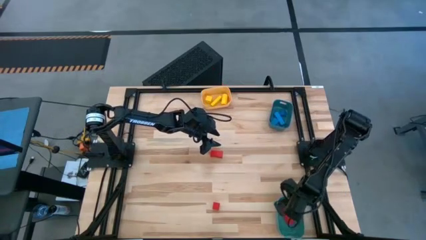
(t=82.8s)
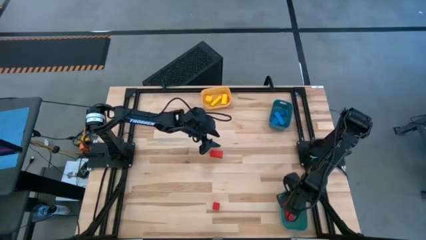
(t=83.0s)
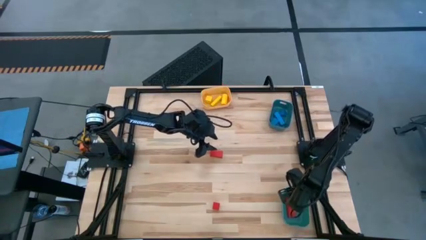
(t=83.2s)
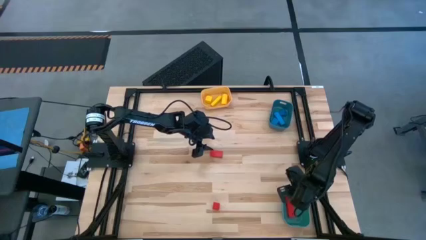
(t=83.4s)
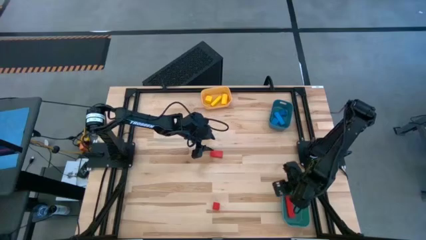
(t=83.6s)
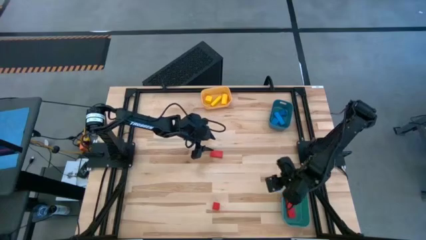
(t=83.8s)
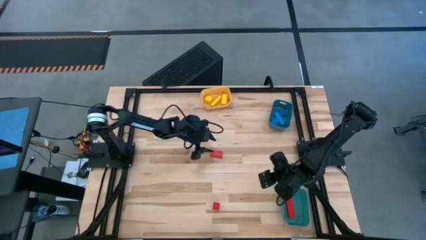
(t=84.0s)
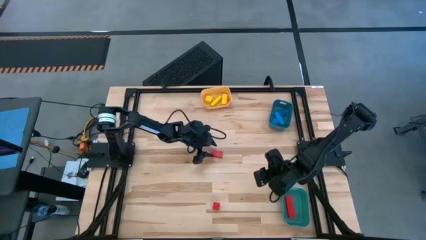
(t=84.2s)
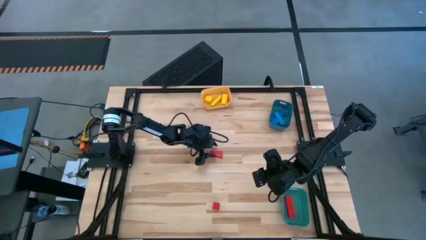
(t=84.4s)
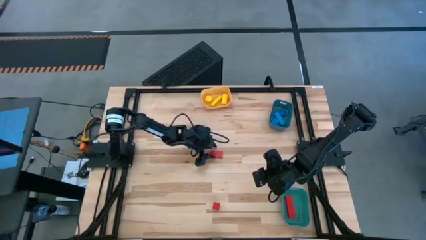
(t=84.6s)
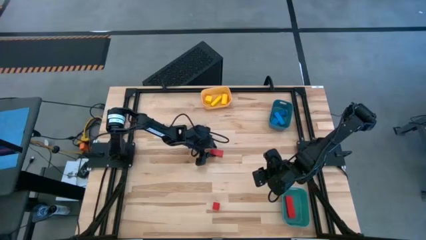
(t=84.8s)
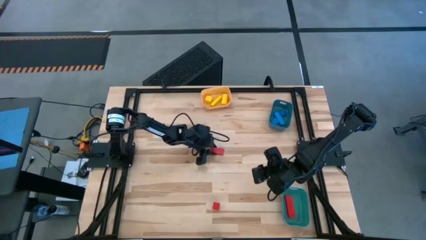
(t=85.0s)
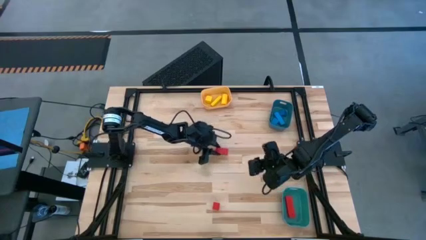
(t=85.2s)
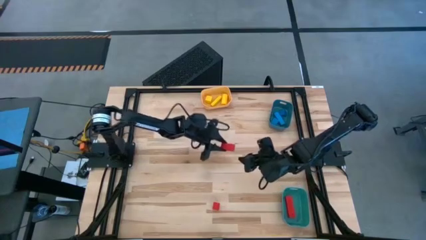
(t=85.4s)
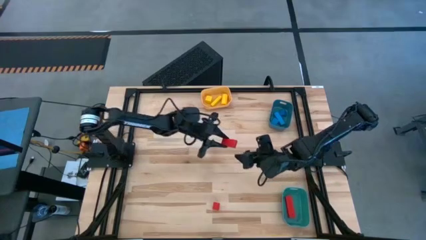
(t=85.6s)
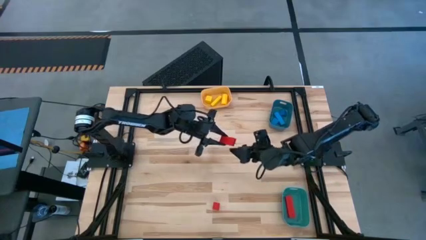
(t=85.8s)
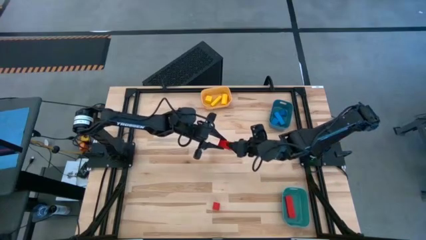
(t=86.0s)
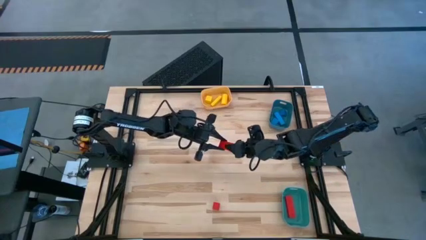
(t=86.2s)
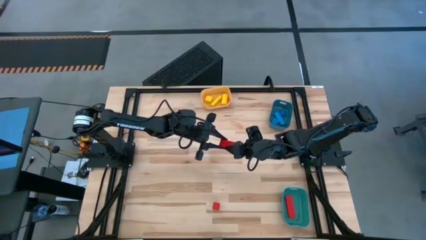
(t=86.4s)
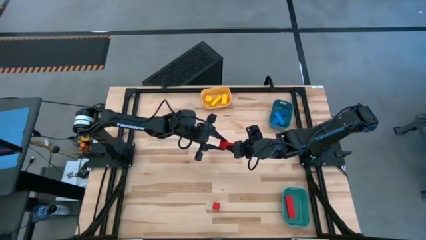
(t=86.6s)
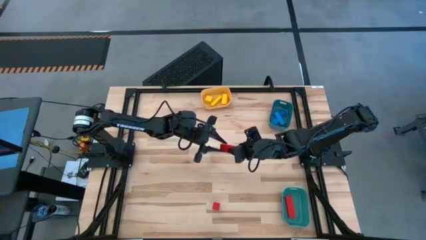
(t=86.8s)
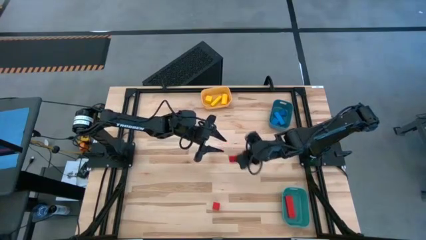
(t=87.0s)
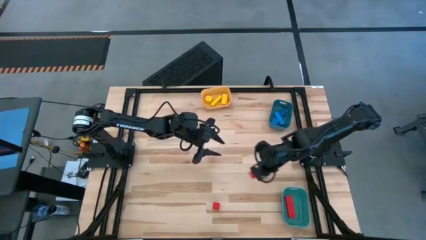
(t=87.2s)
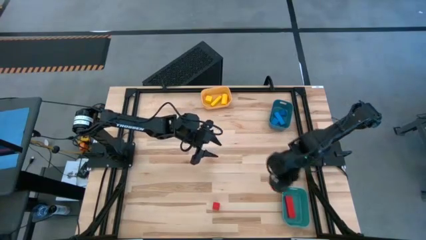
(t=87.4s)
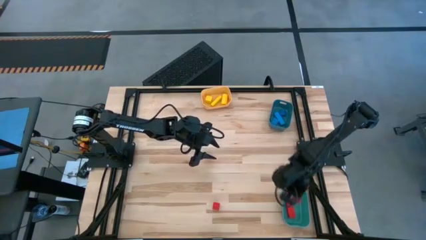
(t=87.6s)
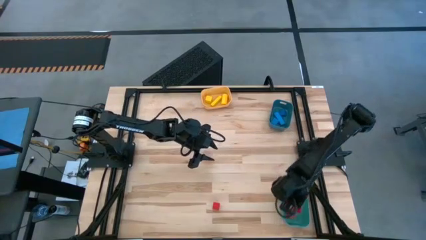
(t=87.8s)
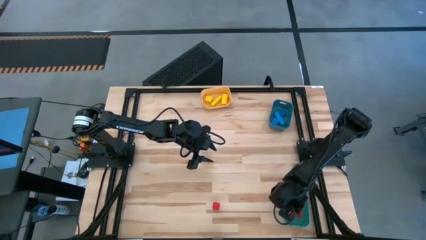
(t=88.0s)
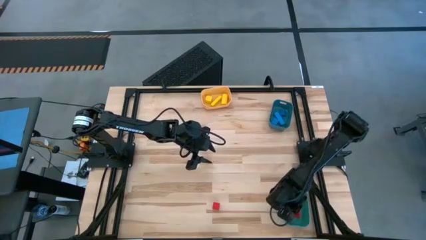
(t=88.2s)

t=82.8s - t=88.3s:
Task: Sort & place blocks by color
Put the top red block into the green bin

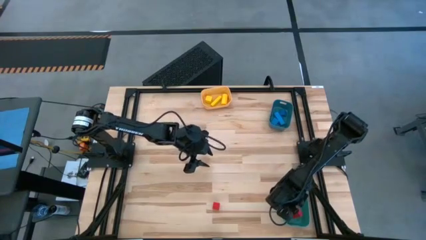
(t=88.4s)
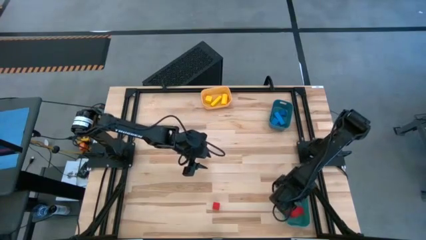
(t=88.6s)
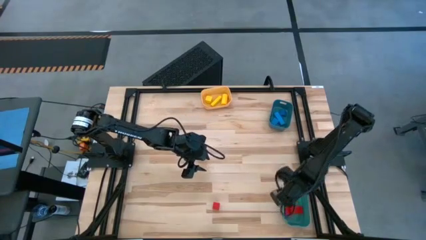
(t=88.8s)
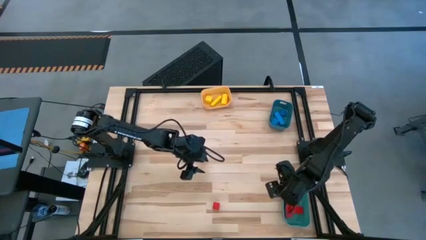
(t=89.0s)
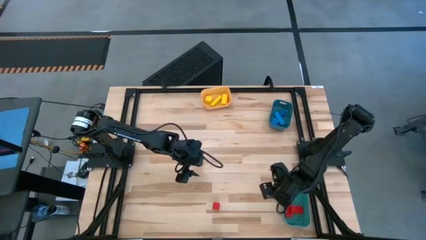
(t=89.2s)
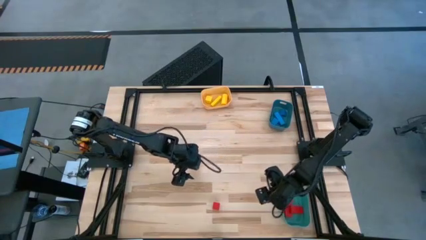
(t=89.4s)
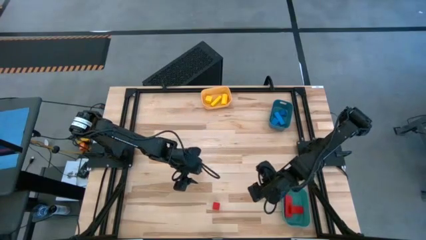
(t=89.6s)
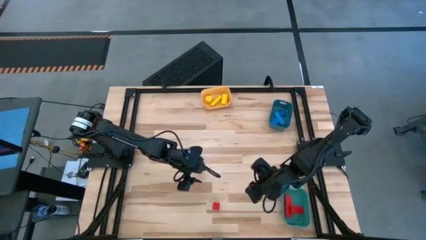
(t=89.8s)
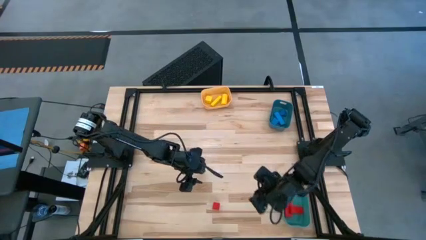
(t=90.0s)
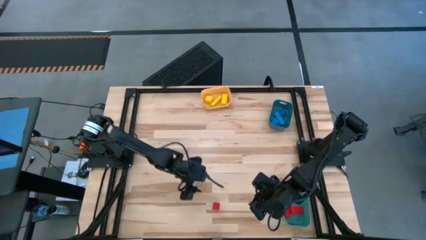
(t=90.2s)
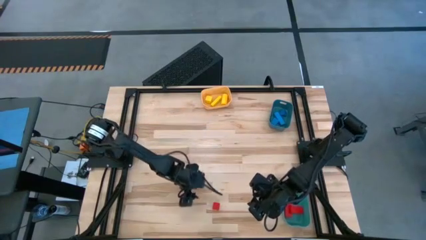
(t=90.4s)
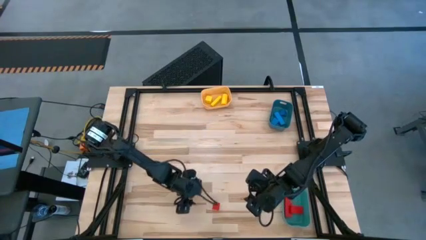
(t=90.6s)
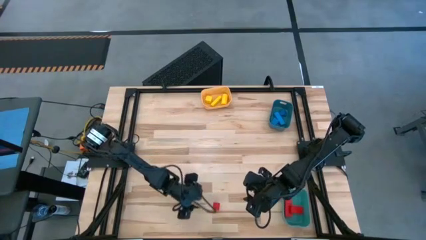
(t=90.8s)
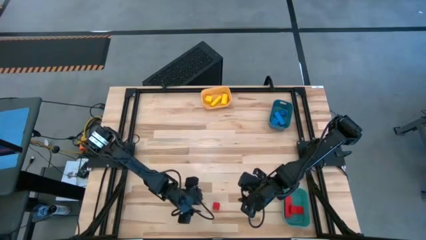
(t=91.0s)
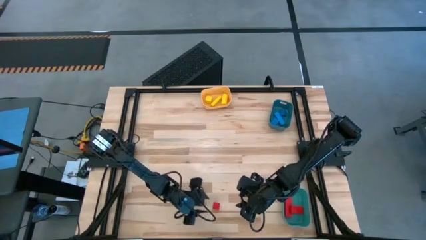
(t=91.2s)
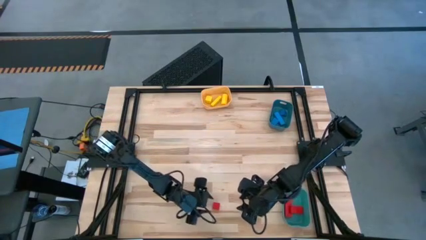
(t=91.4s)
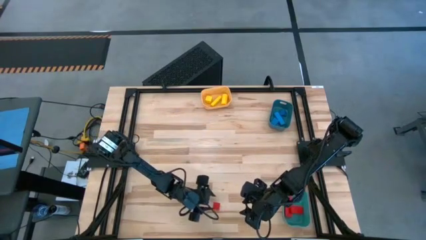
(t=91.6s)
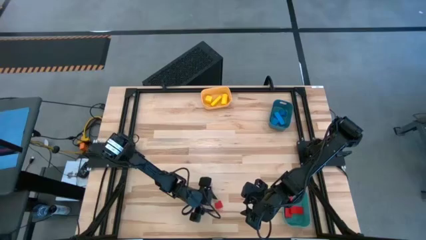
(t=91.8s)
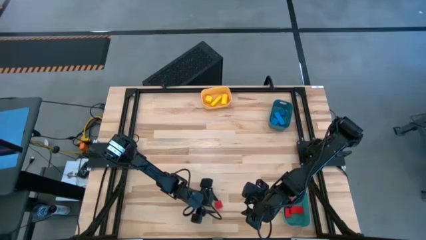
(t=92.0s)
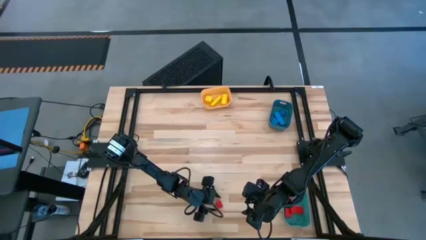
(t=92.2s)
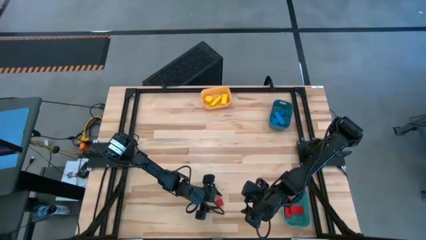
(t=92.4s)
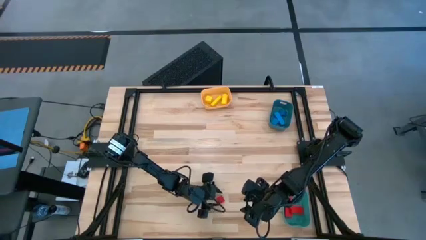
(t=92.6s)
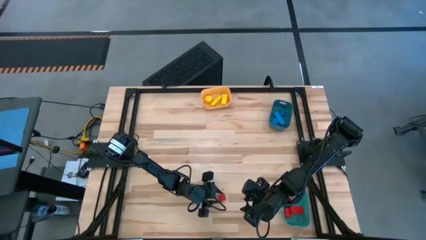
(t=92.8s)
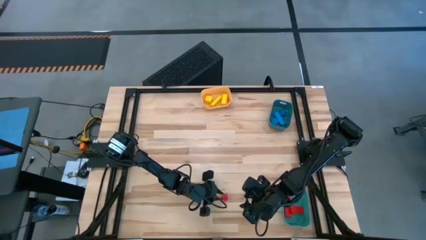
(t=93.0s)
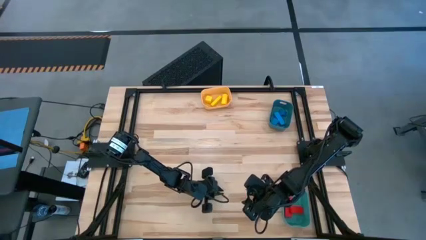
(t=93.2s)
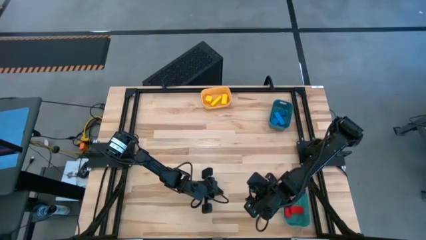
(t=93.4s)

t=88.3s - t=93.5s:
Put the red block into the green bin

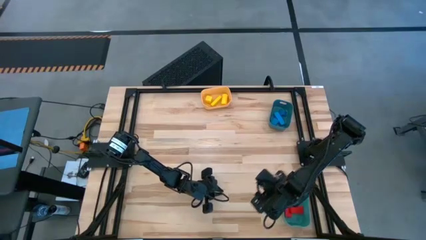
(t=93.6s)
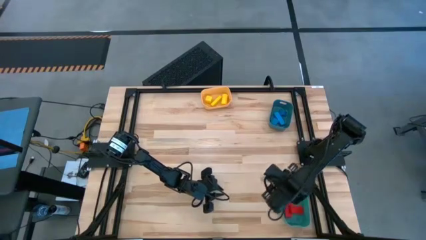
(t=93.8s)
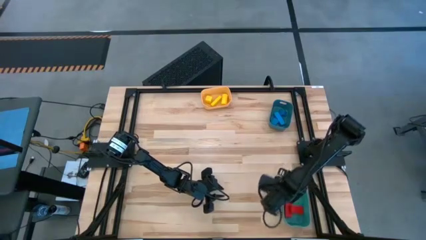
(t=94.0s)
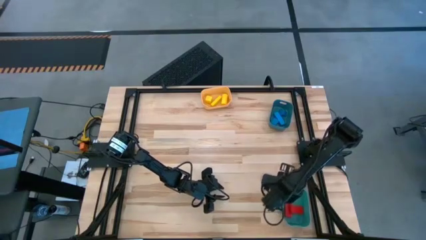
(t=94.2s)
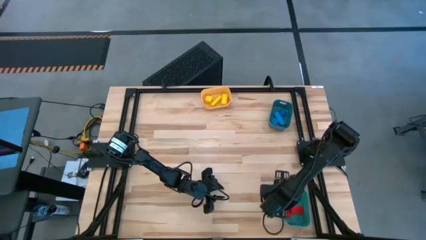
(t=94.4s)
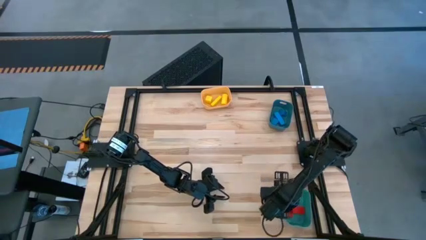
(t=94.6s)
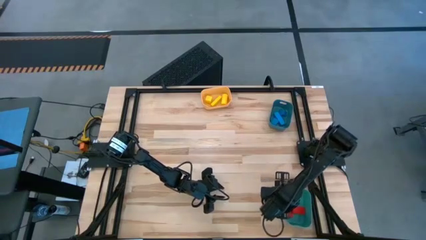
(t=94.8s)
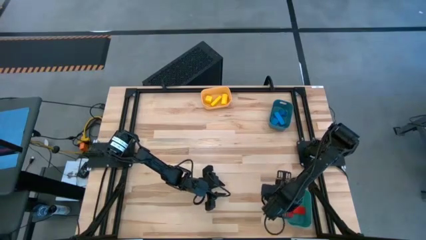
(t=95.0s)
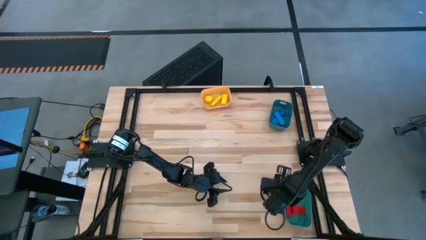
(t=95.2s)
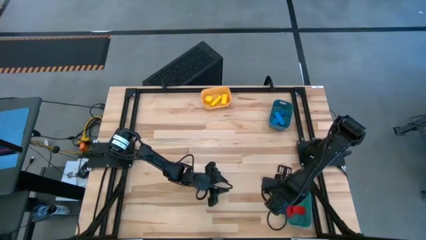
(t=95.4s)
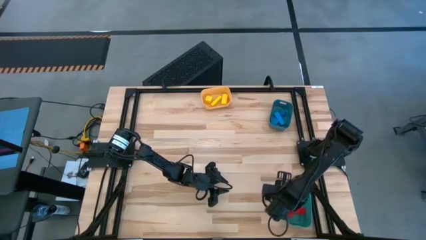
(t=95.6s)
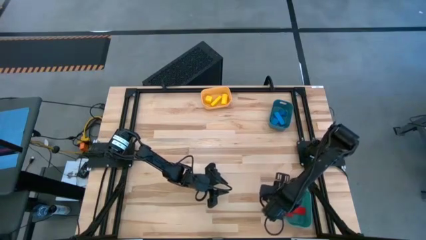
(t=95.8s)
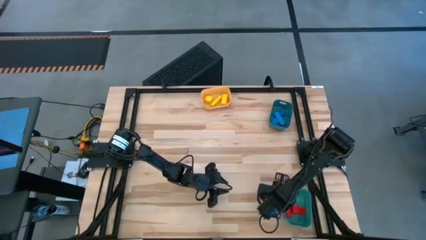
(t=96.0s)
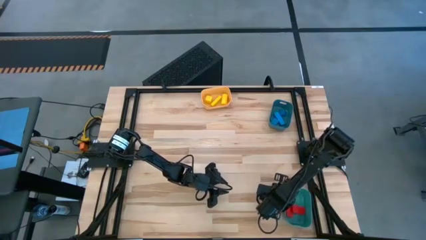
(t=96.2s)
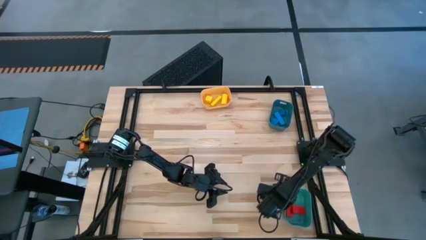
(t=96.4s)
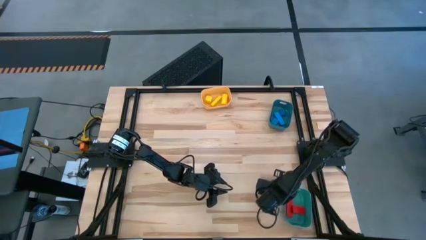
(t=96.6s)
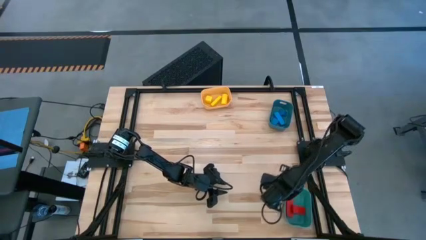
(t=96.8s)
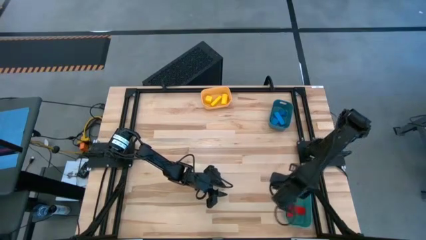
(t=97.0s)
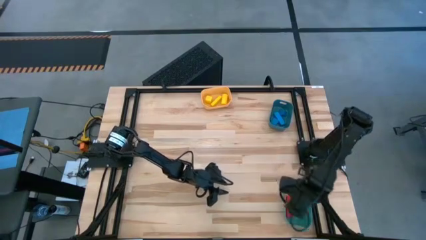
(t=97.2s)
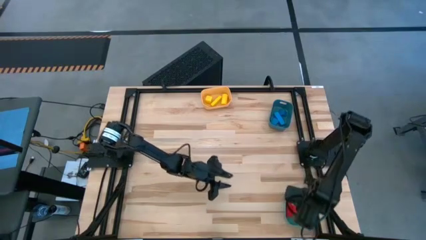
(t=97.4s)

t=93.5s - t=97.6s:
Put the red block into the green bin
